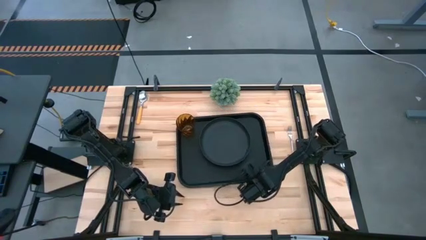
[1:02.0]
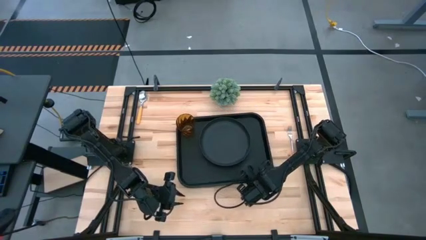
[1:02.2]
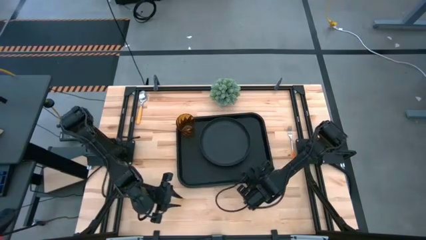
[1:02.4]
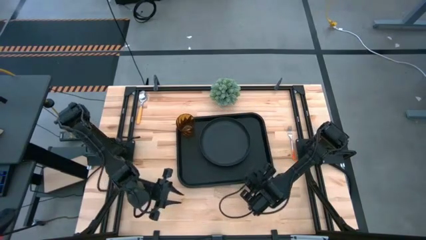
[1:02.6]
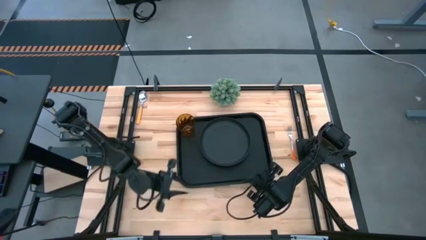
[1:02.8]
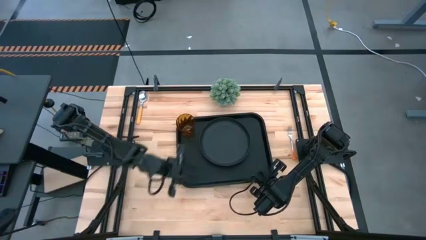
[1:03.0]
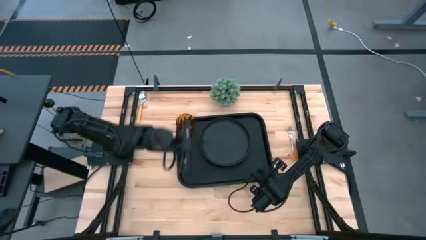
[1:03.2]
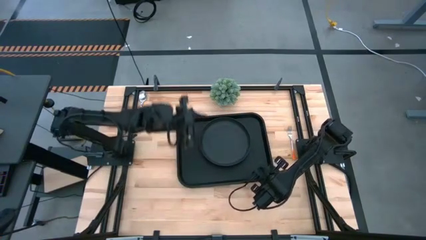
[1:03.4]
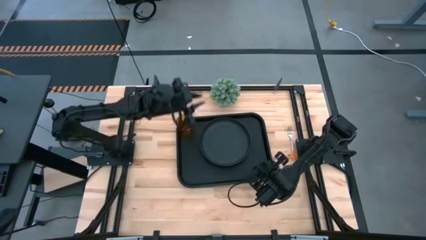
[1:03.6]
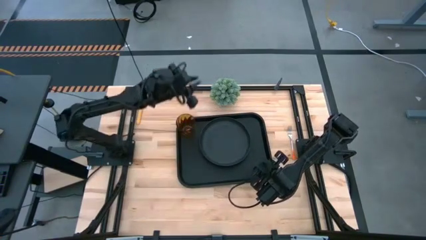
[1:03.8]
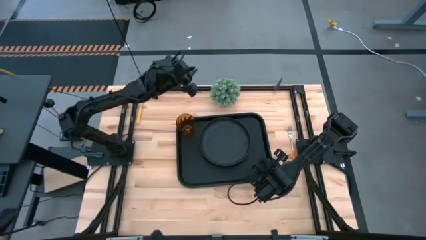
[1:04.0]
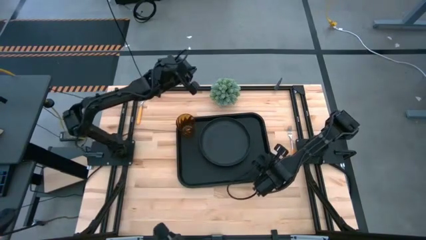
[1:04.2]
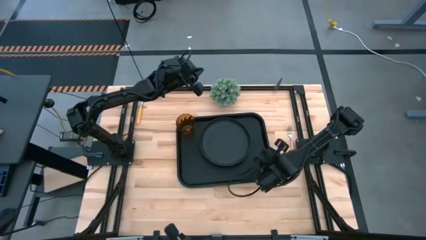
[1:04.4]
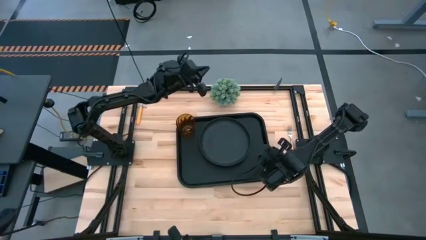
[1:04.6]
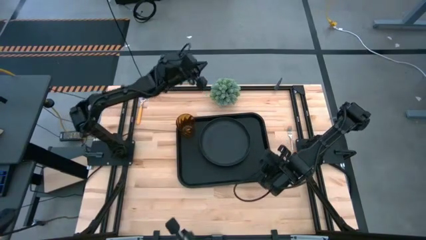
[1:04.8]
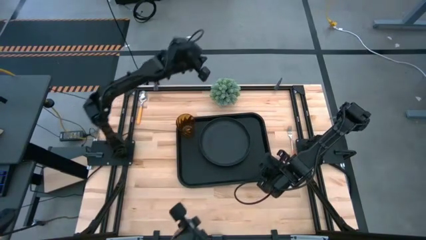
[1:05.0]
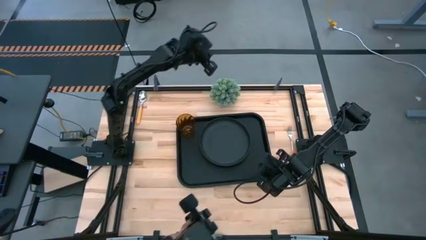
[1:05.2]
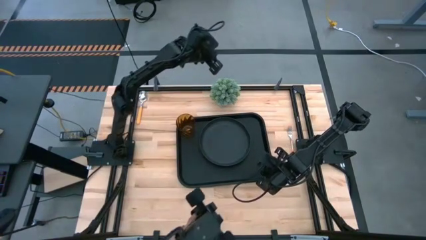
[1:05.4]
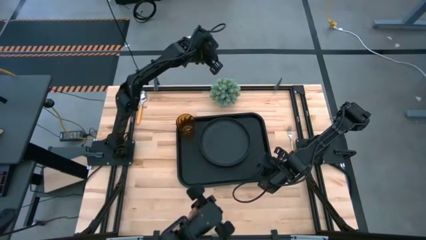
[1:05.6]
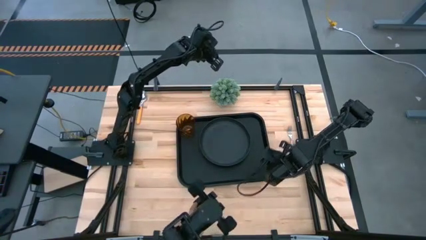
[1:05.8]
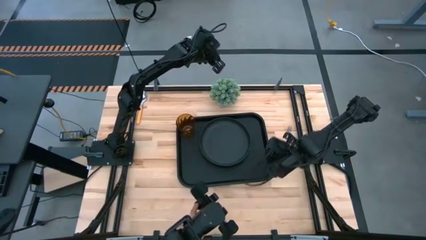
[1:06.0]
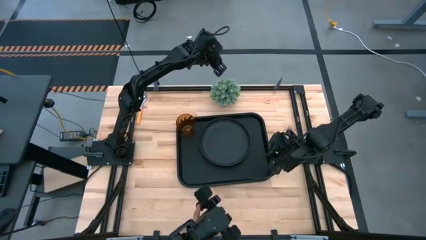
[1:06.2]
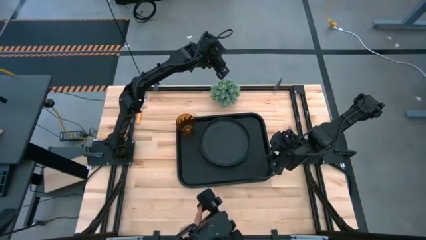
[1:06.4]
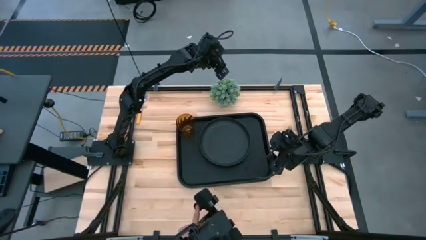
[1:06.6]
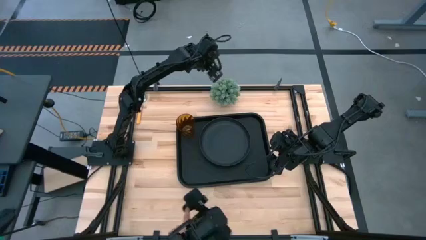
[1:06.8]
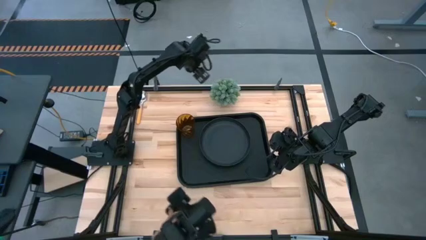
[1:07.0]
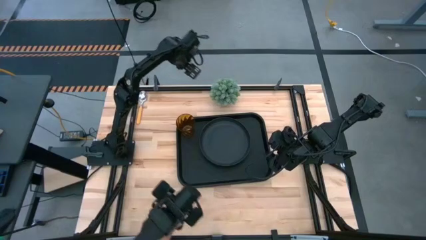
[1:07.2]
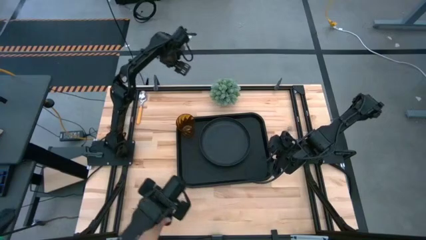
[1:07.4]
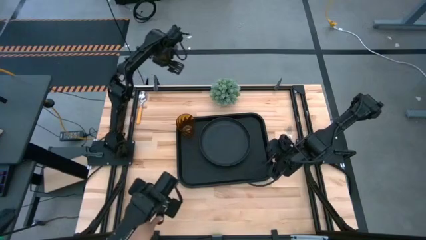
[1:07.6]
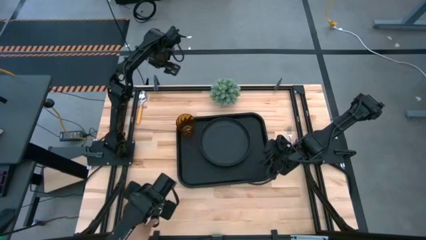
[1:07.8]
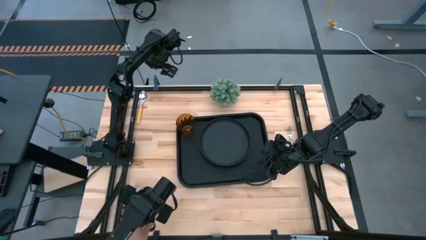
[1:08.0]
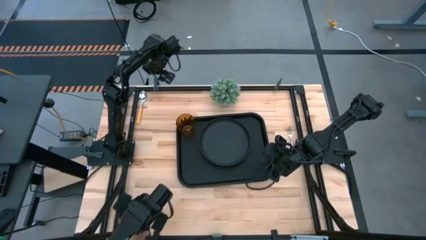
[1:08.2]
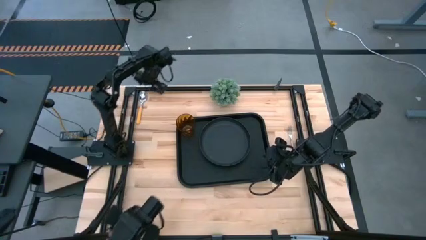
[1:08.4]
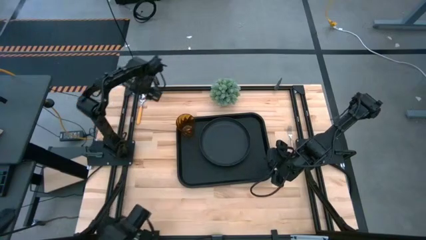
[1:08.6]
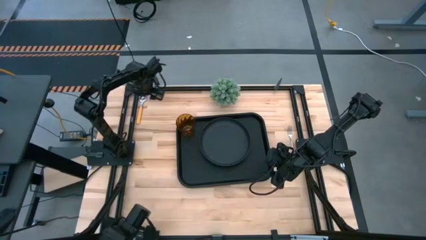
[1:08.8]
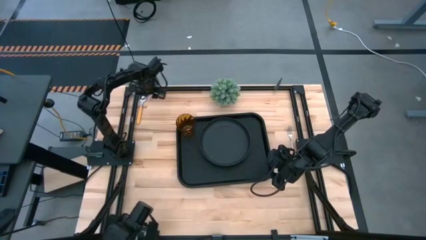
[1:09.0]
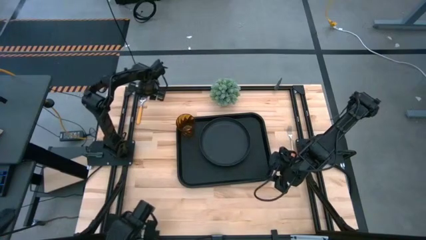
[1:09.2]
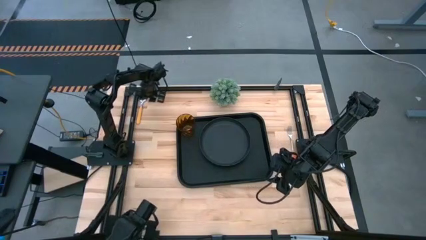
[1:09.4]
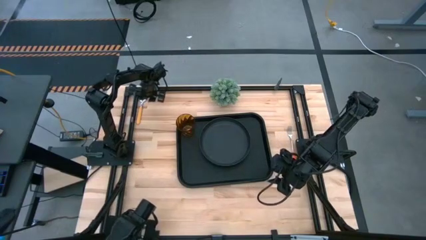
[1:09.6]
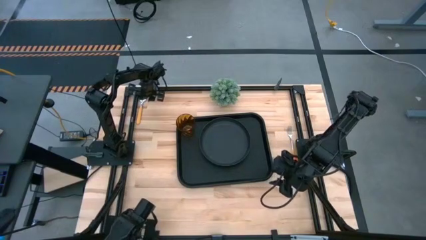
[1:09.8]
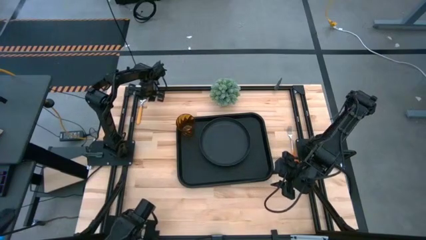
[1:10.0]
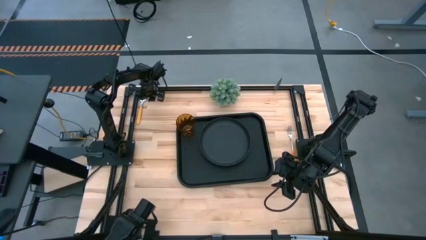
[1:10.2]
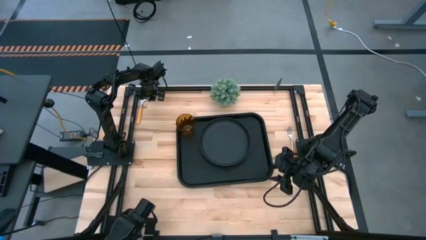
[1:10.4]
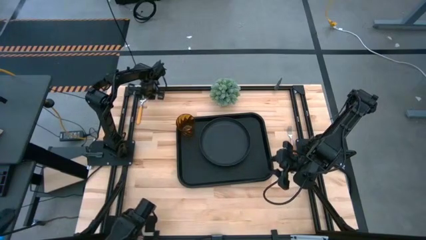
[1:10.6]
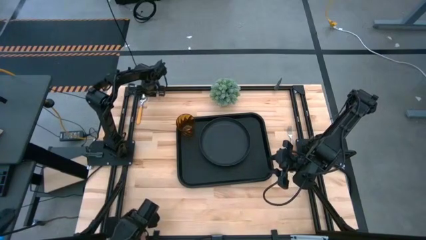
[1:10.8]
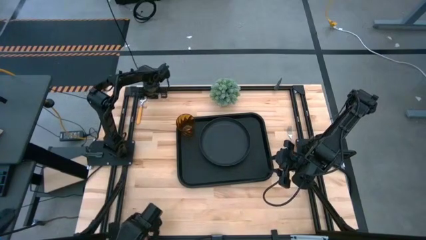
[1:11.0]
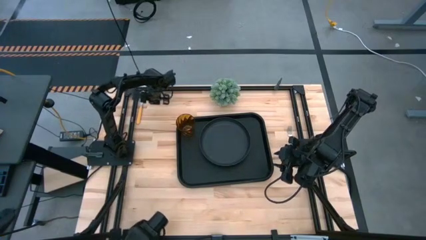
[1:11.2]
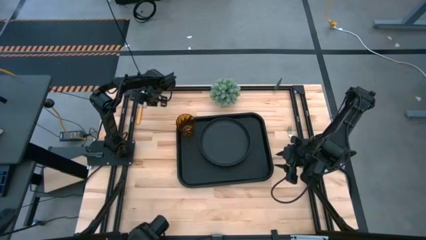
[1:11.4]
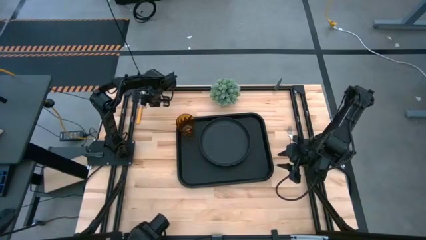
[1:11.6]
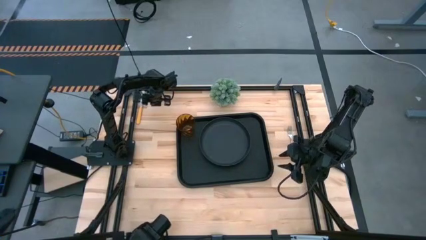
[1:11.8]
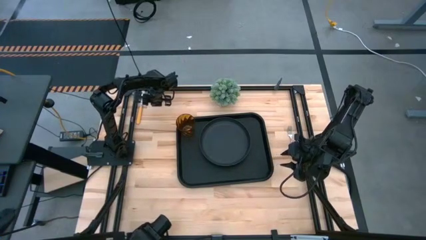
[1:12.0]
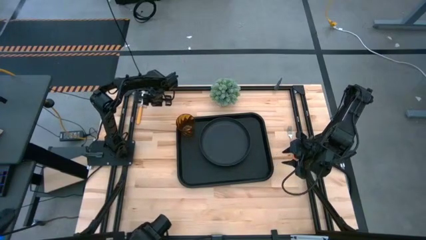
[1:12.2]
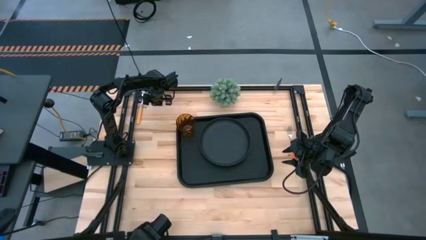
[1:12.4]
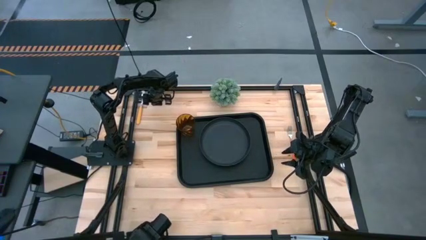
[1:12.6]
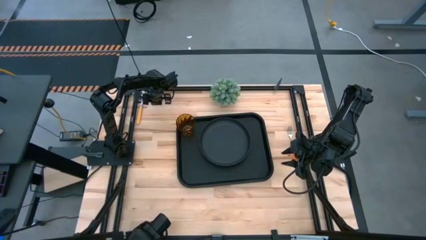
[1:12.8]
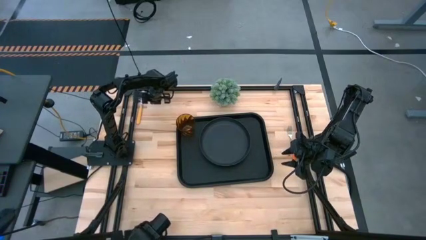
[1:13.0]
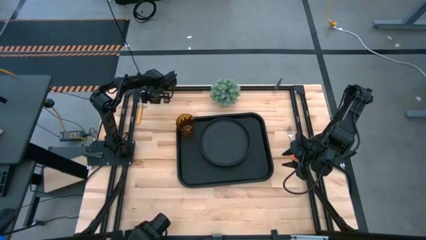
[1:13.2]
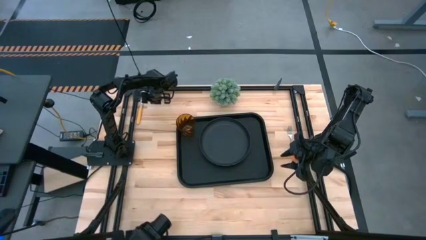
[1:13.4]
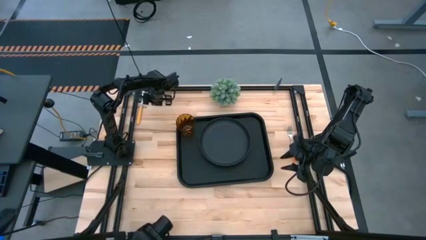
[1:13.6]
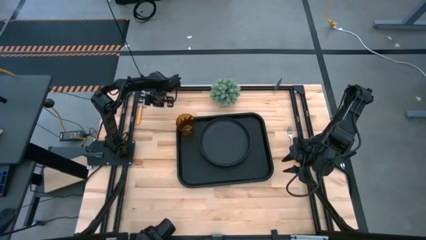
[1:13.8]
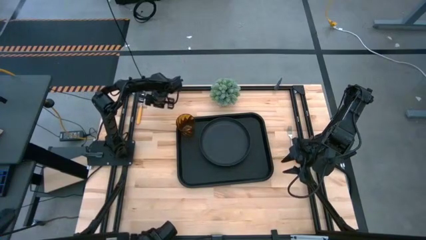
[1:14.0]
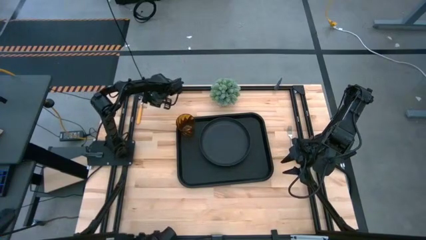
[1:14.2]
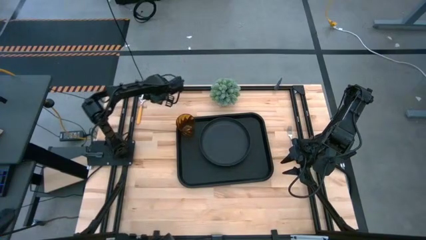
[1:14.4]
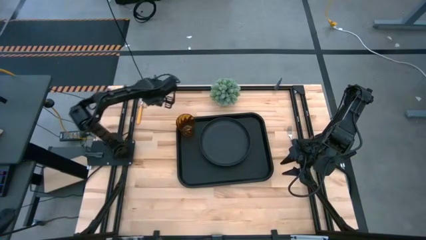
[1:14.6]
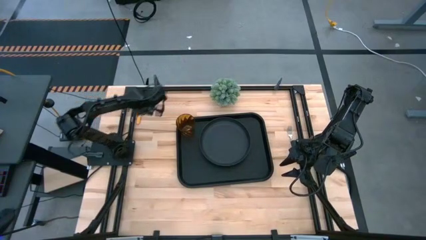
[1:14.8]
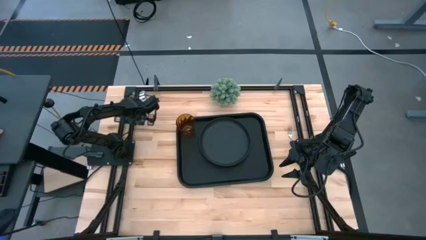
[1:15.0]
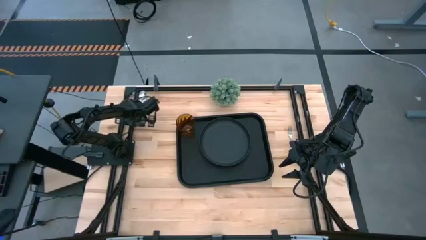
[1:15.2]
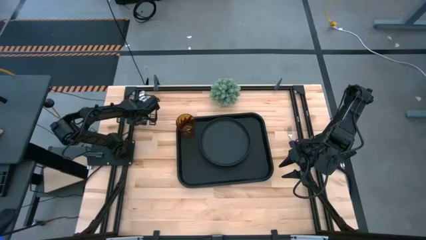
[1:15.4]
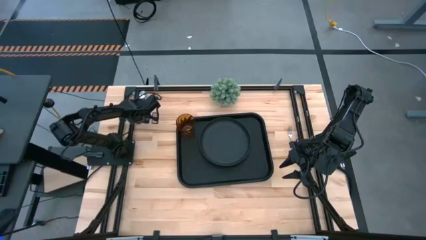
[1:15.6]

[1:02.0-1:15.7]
Task: Pick and place plate/cup/fork/spoon on tray
Put the orange spoon on the black serving tray to the left of the black plate

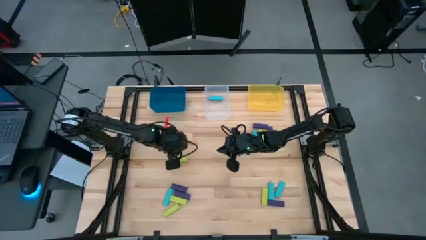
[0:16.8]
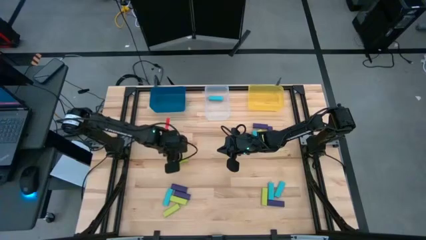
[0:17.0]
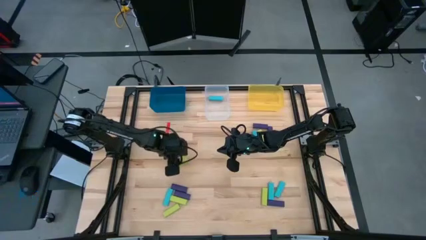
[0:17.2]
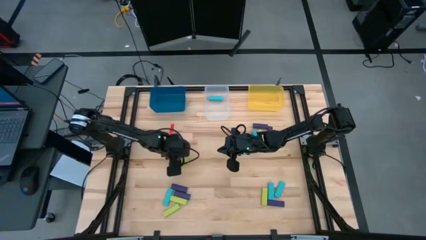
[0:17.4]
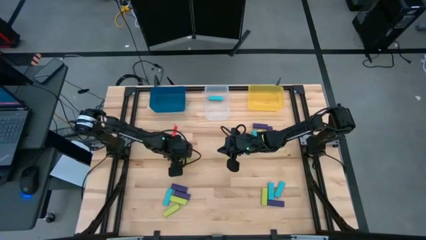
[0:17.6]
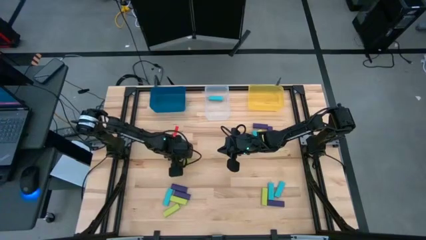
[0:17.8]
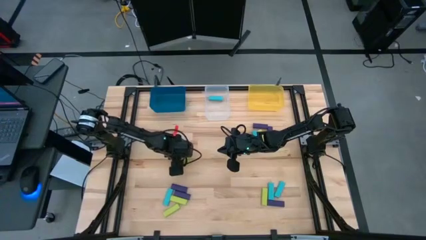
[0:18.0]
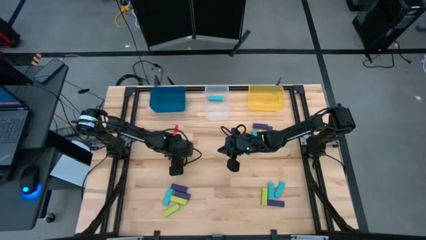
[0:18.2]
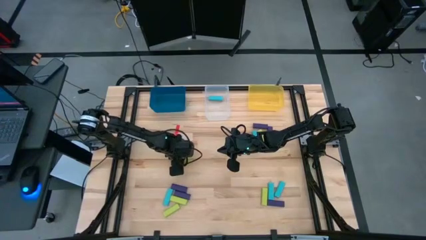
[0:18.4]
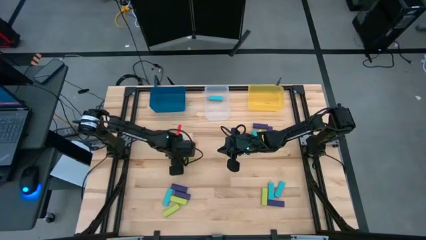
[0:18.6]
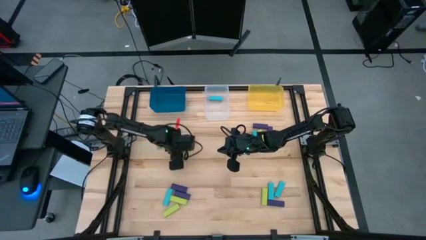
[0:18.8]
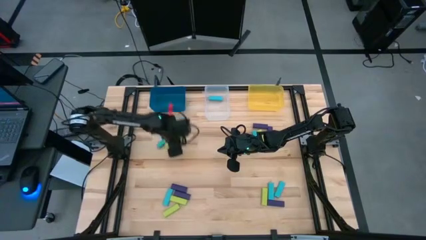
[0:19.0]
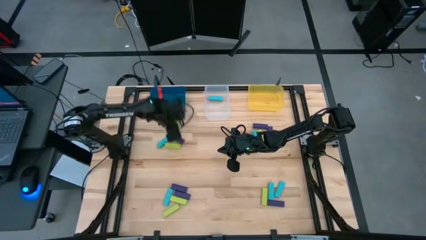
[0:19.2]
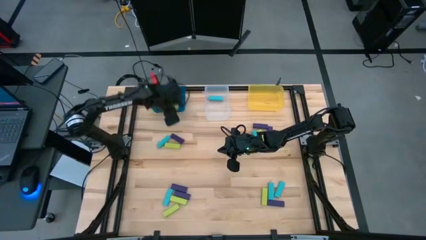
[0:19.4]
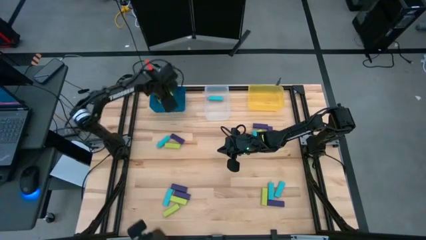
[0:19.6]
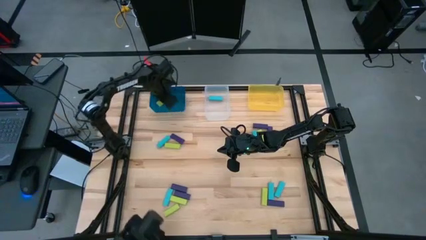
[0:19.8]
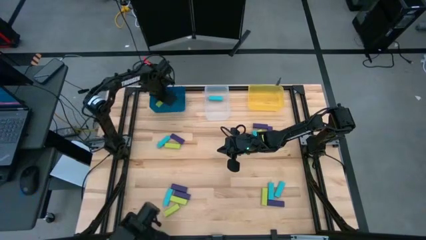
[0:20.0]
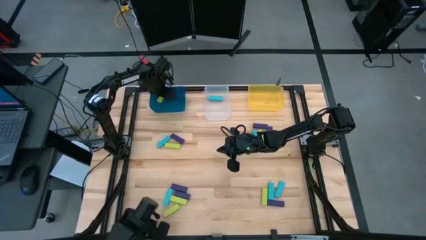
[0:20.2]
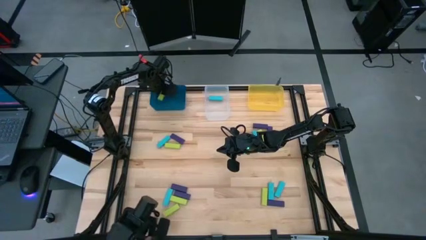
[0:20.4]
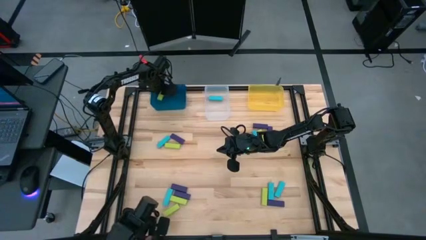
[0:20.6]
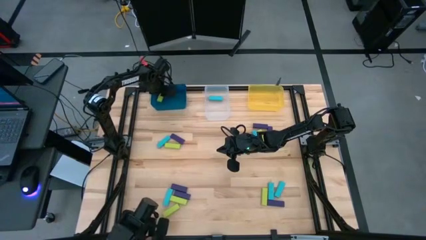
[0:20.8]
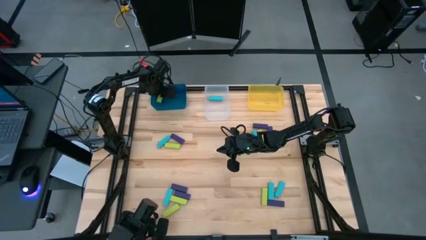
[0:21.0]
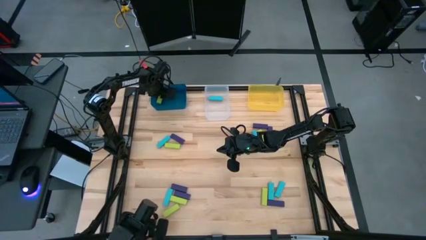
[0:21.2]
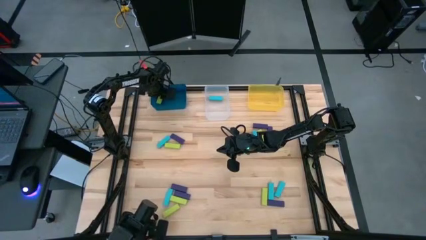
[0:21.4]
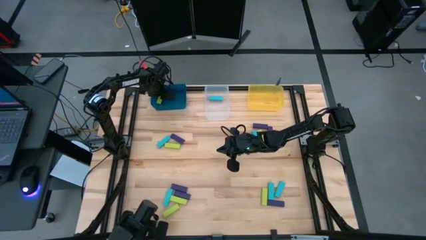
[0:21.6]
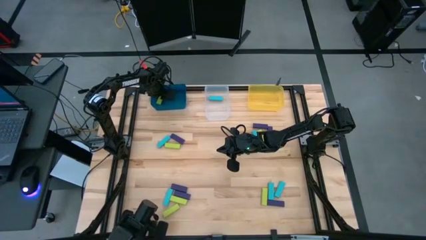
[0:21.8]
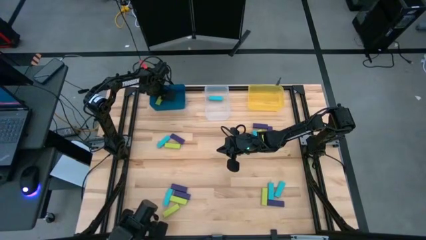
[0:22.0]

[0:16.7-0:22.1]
Task: Sort blocks
Put the green block into the blue bin
